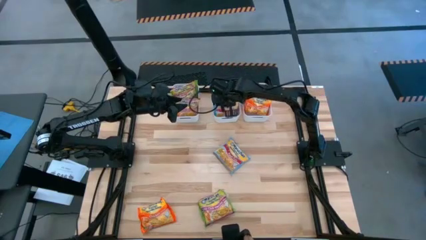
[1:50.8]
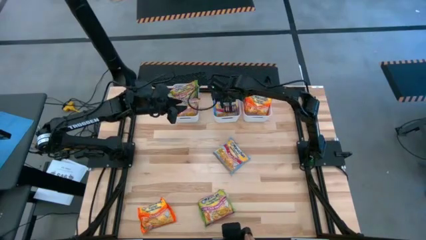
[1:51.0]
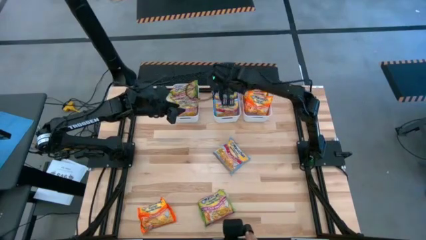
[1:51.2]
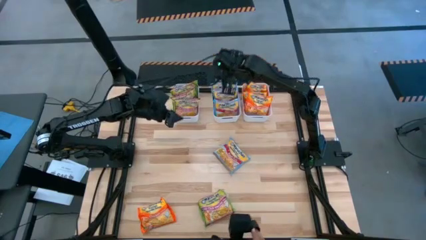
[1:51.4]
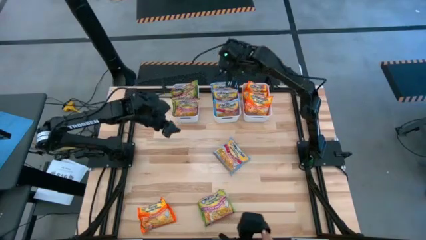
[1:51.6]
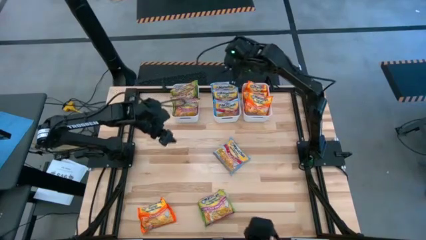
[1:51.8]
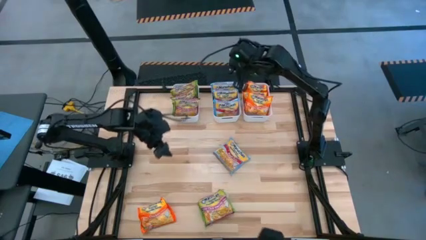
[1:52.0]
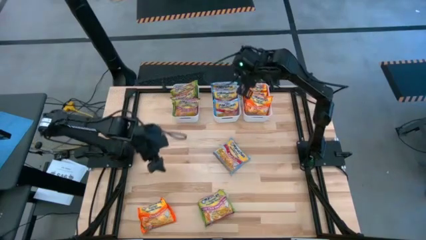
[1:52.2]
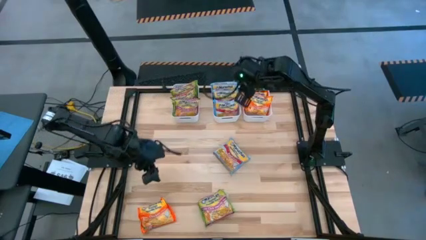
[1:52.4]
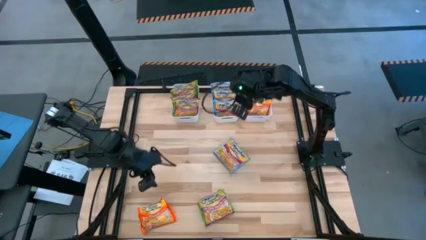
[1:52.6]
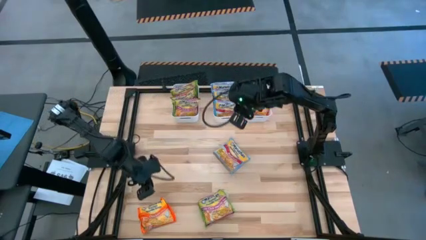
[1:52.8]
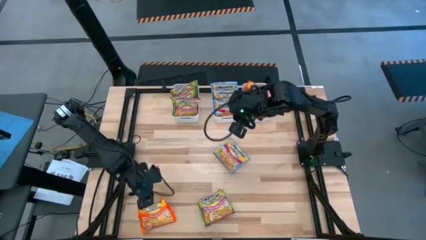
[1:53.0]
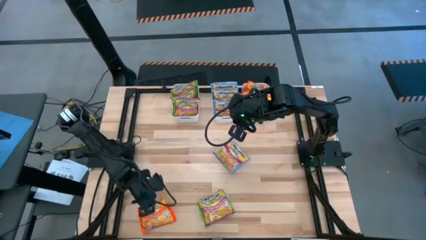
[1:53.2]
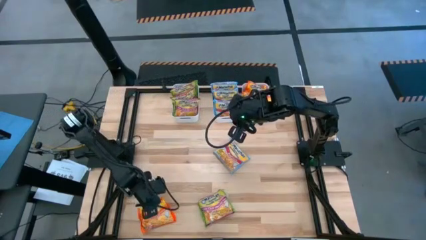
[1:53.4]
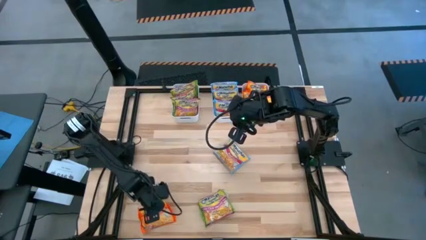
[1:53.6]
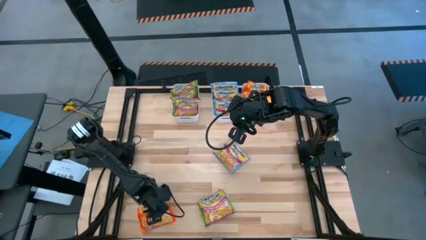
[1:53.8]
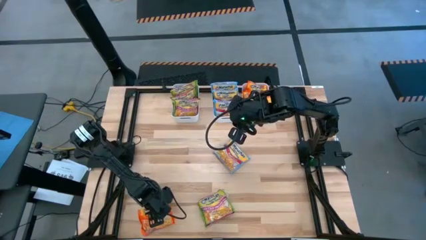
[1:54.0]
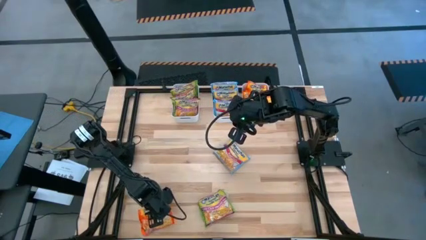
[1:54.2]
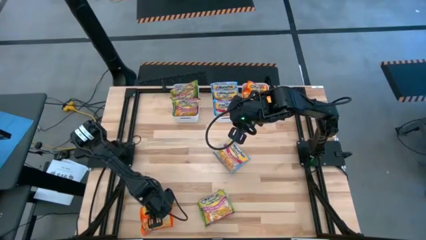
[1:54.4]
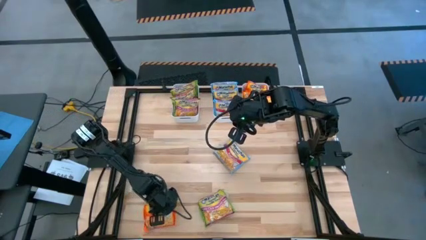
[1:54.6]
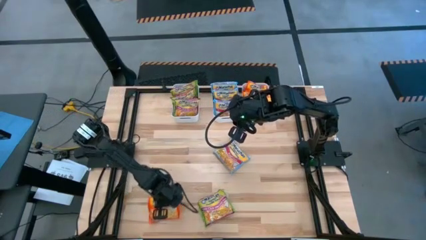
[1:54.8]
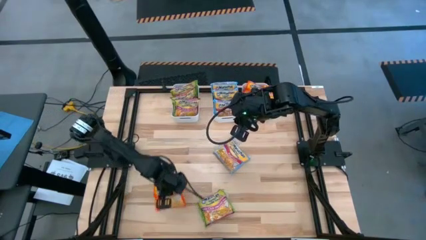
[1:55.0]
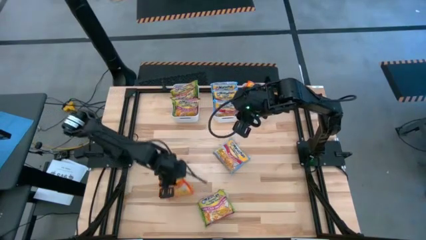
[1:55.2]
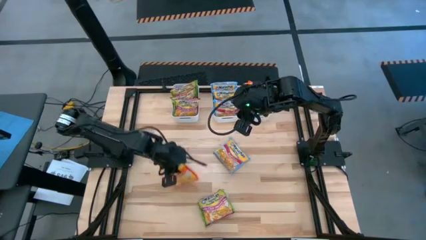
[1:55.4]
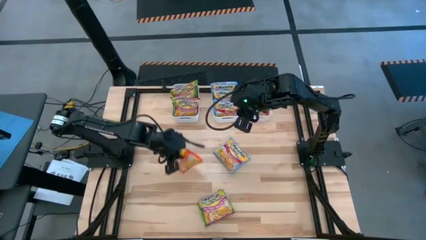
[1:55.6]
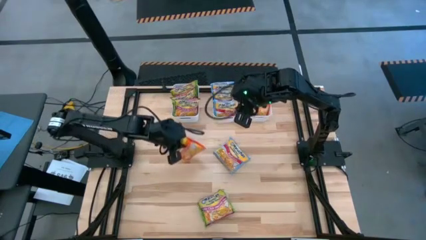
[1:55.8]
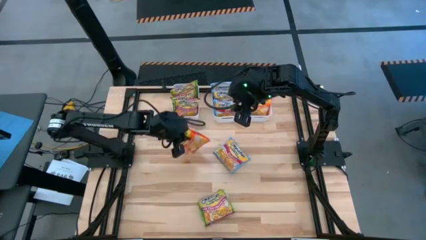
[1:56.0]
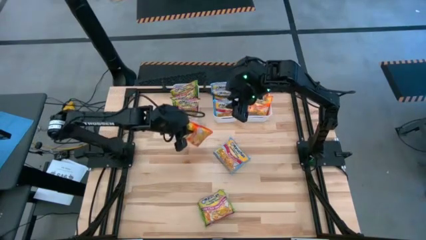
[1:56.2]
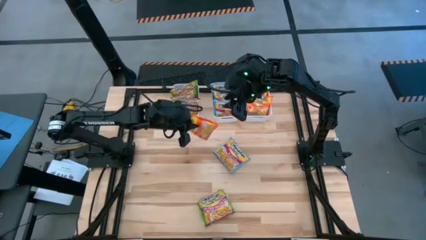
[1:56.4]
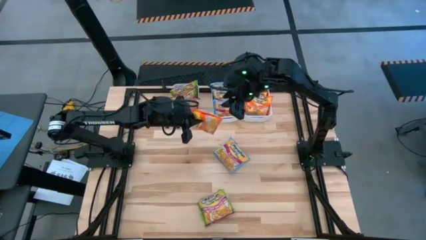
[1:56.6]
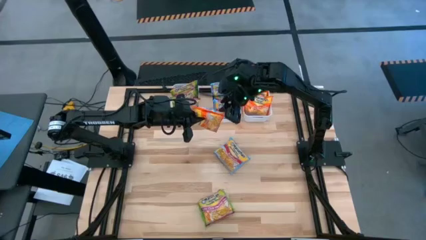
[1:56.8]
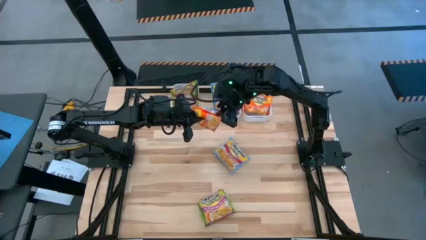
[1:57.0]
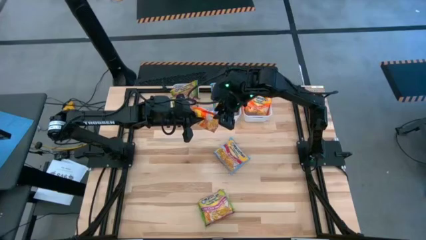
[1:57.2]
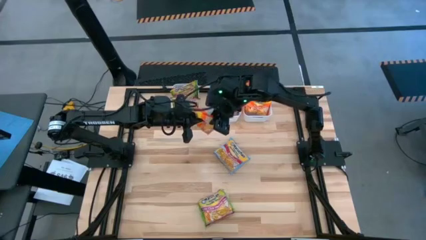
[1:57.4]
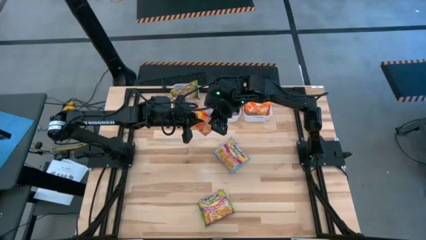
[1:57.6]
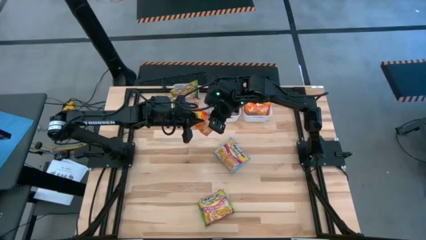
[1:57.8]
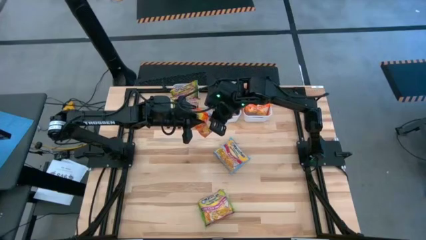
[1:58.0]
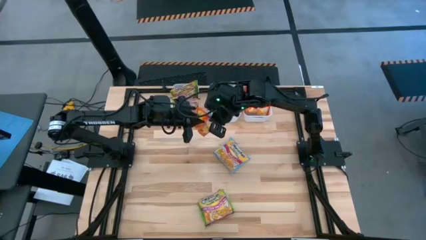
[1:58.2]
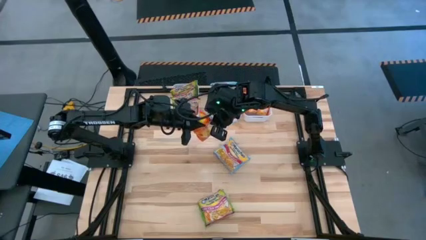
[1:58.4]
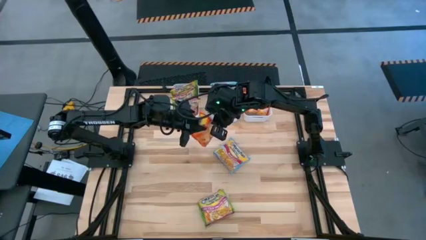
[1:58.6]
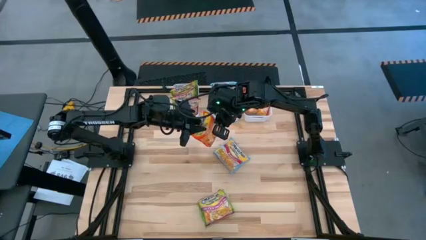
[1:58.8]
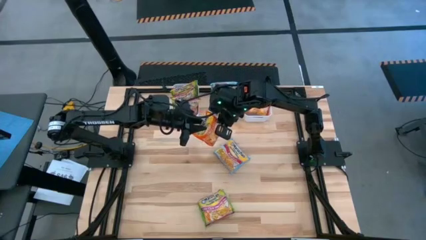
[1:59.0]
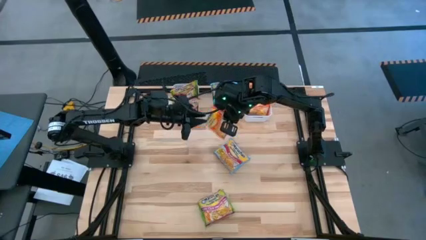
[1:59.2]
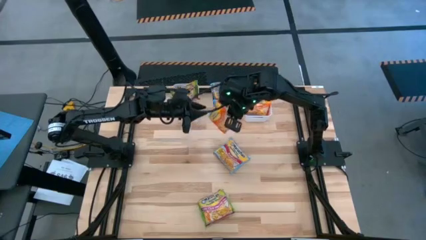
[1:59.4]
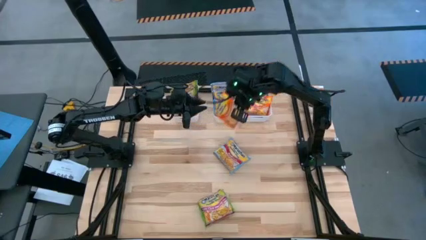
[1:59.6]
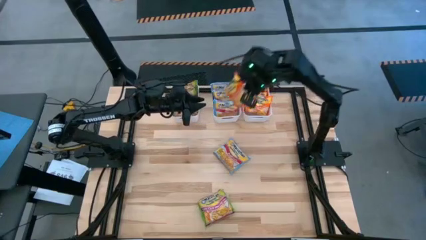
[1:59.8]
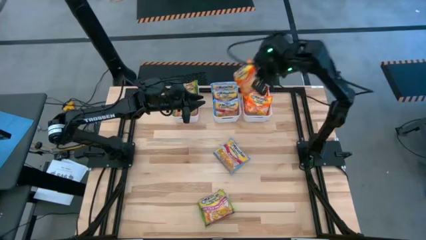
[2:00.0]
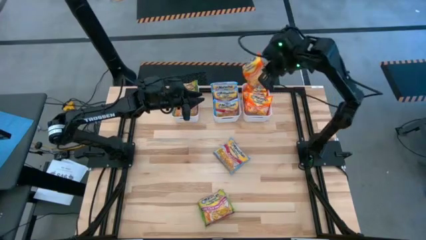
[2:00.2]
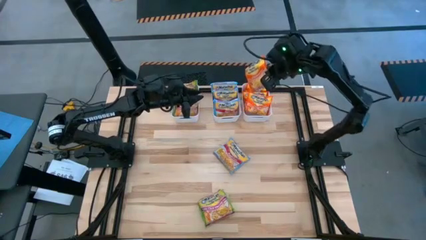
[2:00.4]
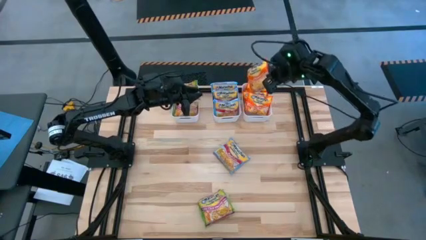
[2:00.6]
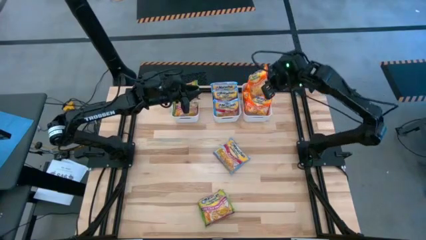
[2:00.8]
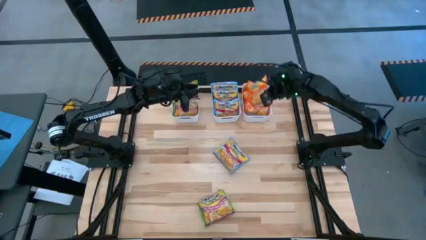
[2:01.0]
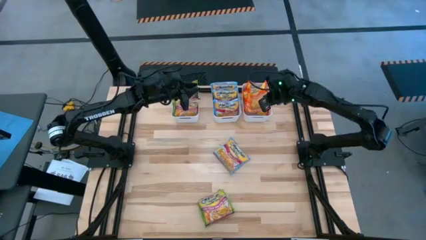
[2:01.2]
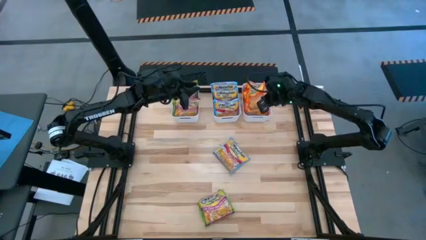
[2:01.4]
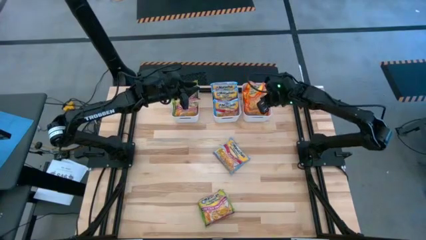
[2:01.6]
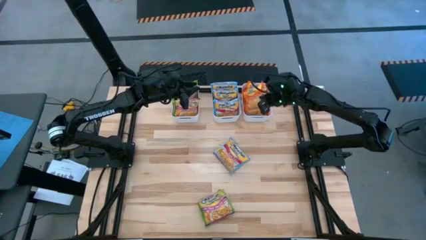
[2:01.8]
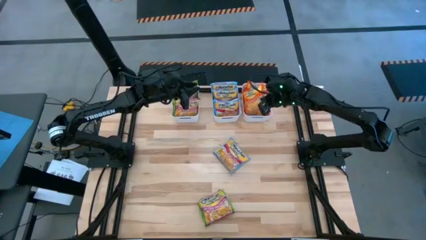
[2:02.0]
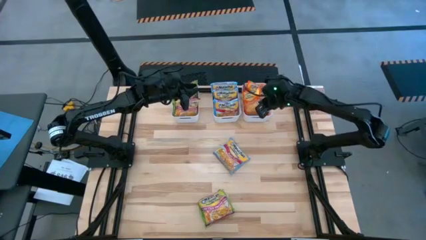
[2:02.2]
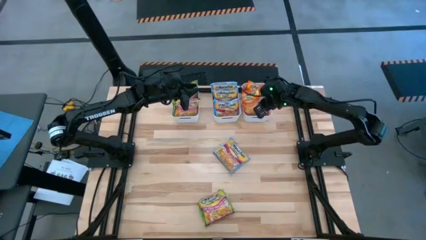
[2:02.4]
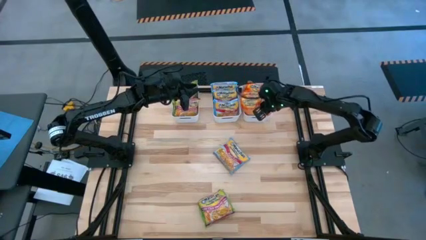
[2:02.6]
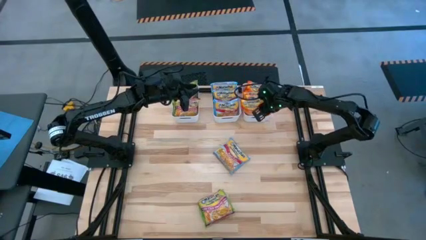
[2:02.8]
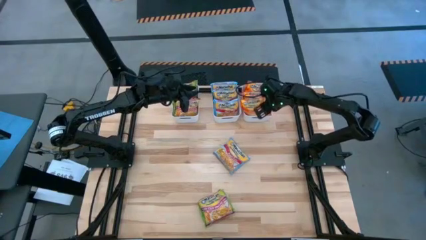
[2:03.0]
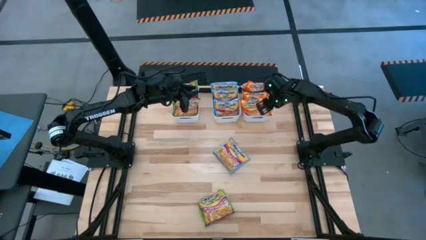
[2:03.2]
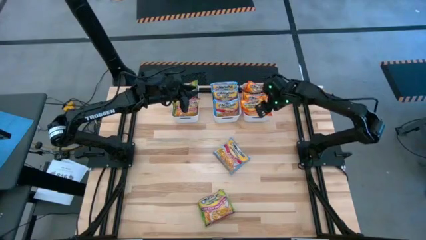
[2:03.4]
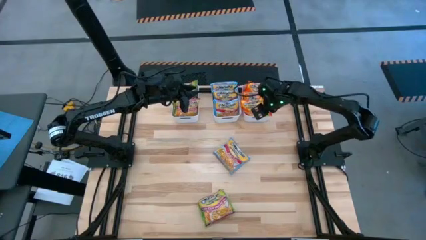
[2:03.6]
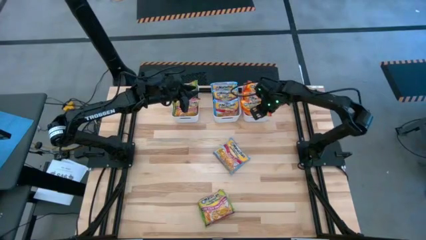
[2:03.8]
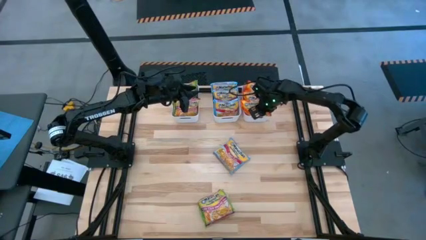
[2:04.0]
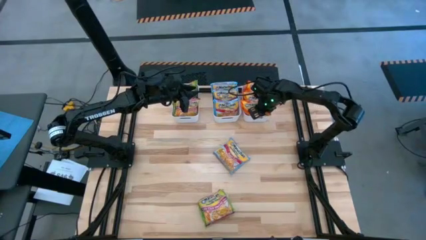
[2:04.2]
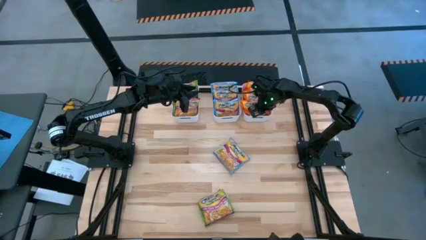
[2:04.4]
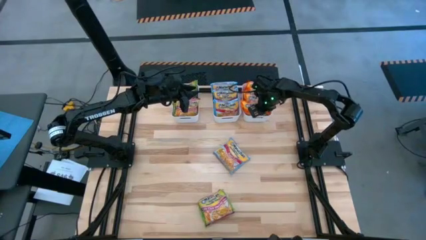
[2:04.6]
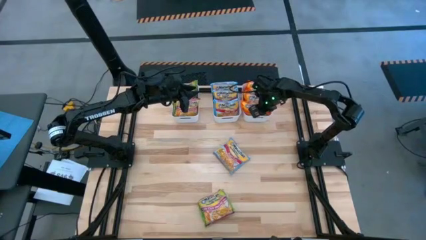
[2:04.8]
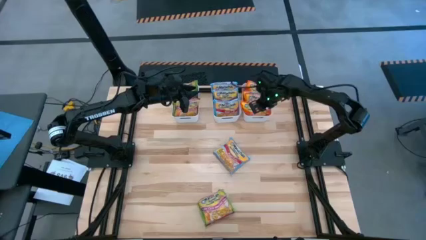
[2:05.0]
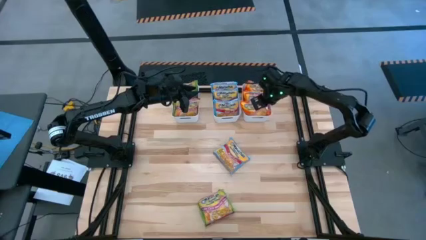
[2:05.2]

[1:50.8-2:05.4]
Task: Sort Maruchan noodles
Put the orange noodle pack into the right white bin

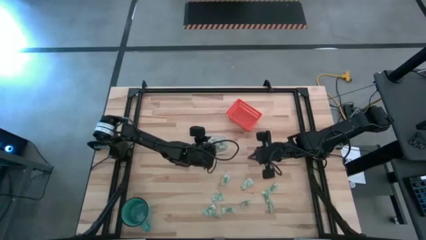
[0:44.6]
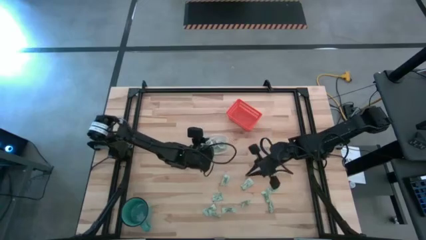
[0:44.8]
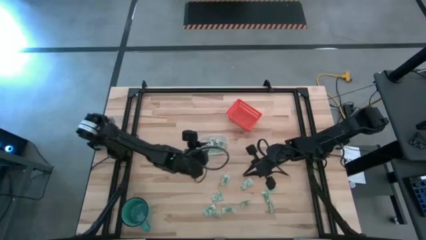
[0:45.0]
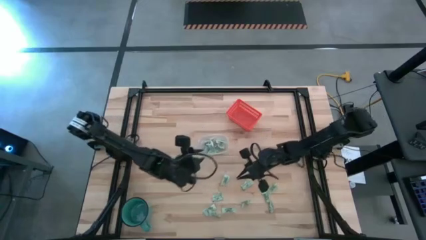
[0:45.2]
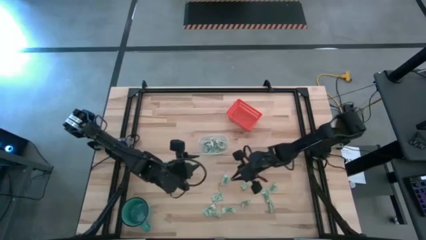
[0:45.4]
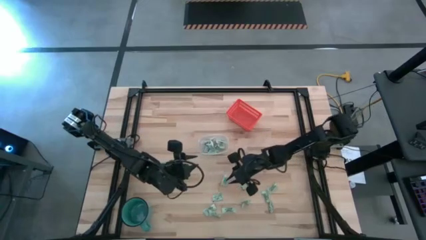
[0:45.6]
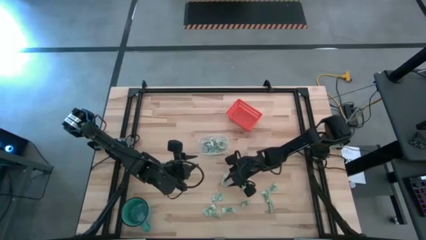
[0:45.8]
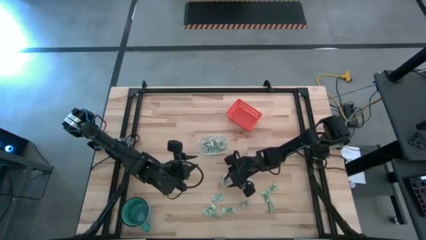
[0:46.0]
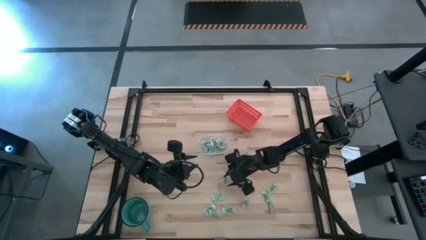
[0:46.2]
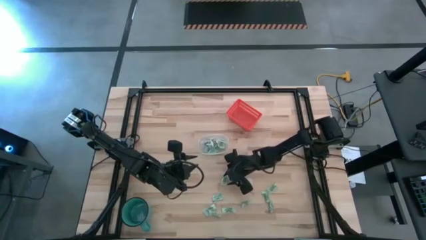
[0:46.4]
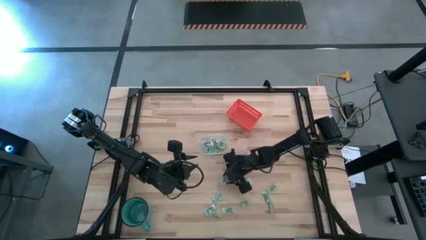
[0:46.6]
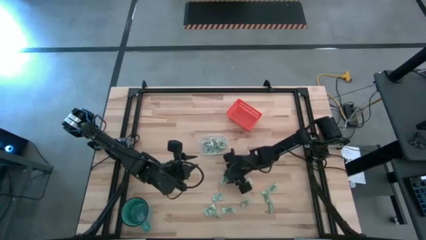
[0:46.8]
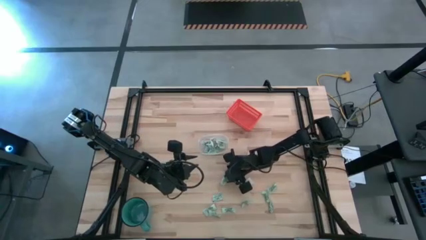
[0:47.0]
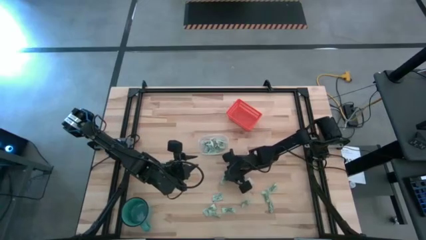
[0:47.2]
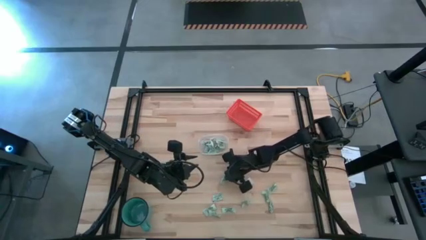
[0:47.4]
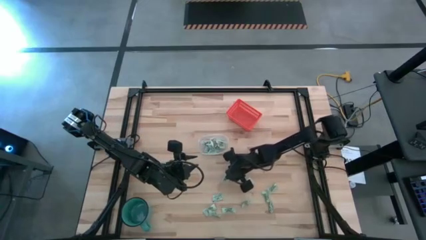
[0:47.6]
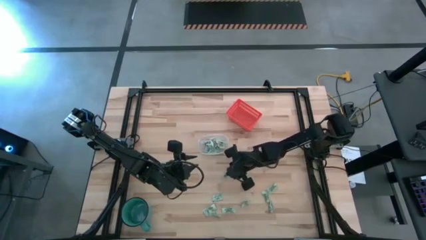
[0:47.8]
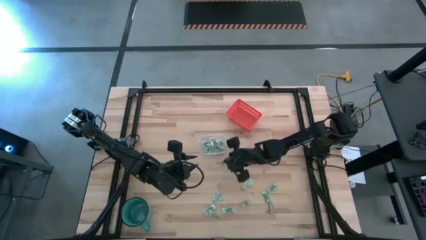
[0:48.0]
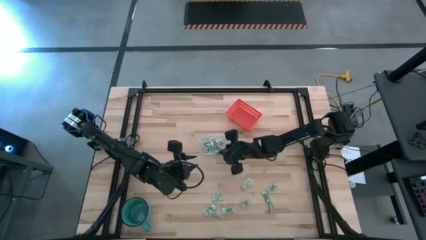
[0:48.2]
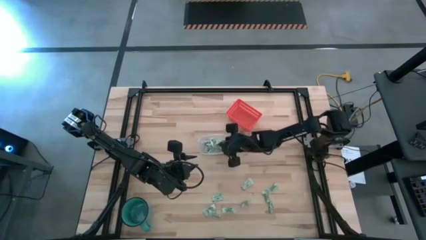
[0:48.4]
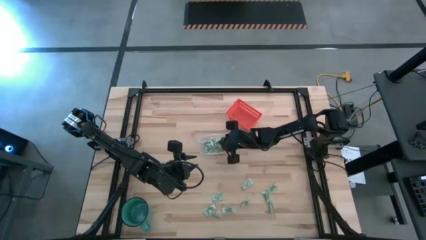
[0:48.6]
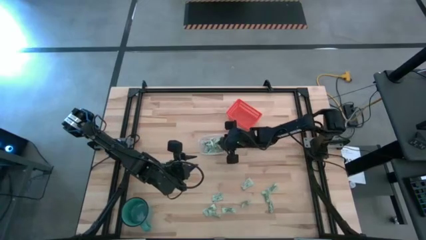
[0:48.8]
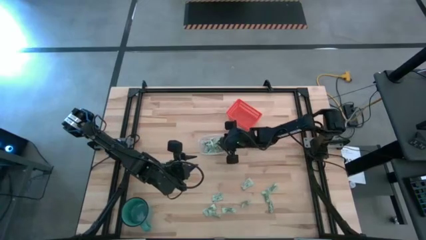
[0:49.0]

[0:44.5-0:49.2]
Task: Pick and place items into bin
Put the stevia packet into the transparent bin
